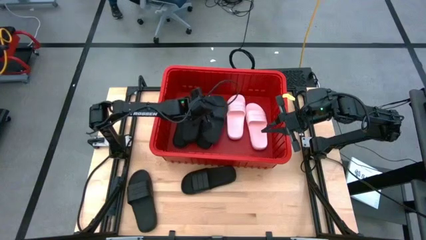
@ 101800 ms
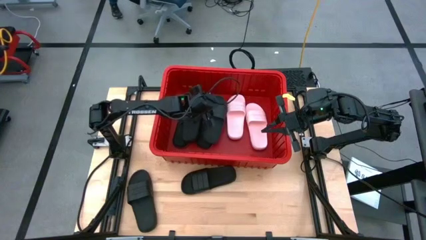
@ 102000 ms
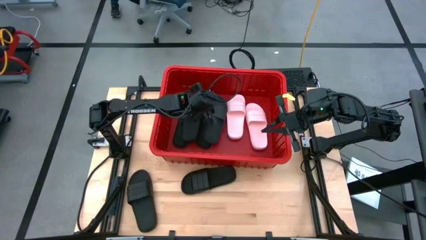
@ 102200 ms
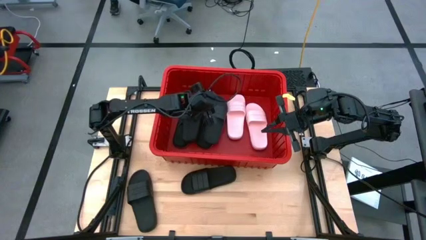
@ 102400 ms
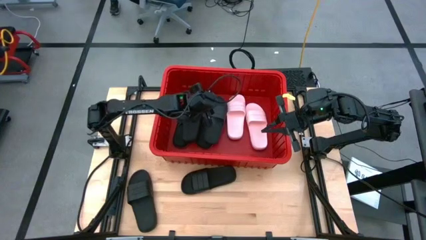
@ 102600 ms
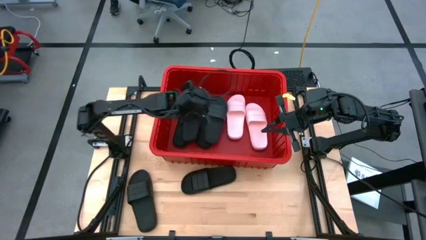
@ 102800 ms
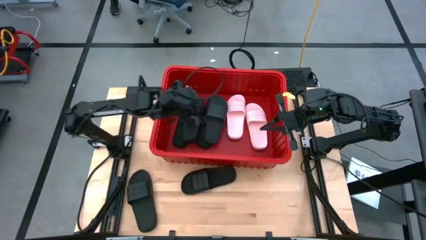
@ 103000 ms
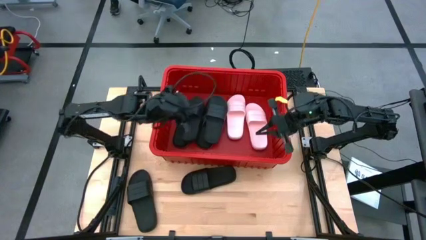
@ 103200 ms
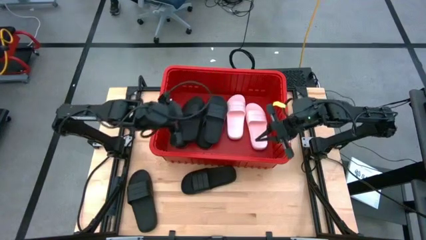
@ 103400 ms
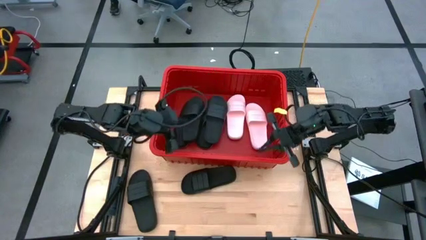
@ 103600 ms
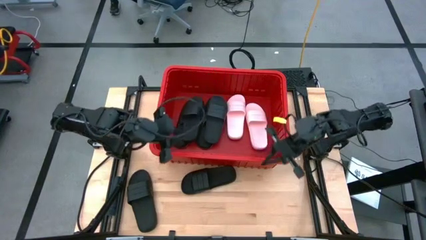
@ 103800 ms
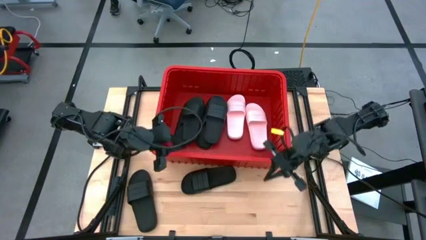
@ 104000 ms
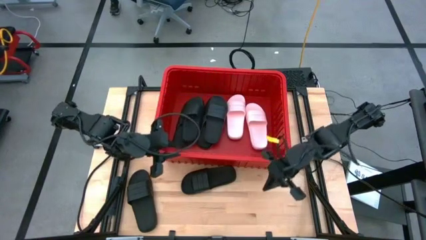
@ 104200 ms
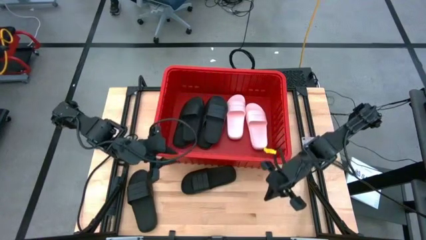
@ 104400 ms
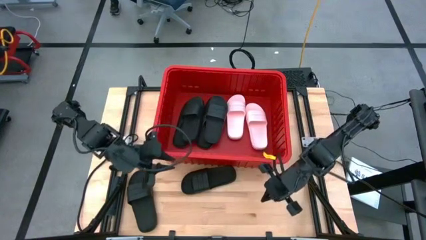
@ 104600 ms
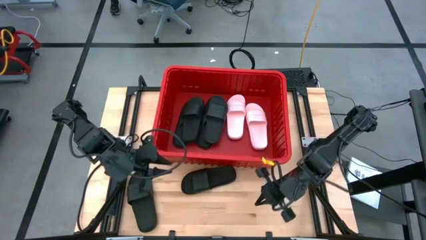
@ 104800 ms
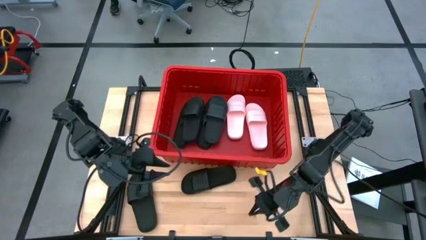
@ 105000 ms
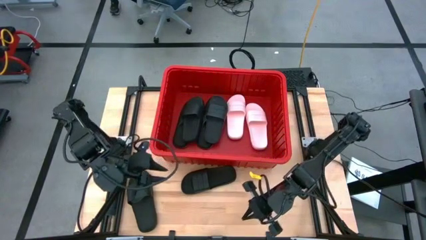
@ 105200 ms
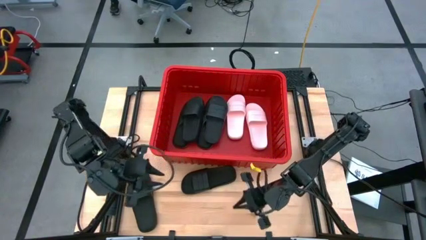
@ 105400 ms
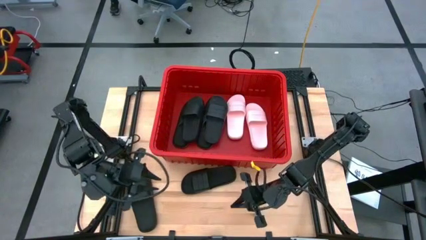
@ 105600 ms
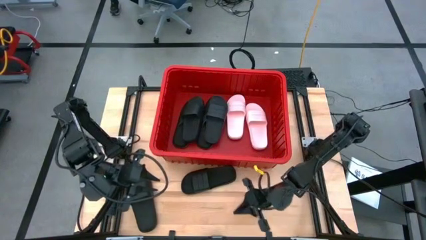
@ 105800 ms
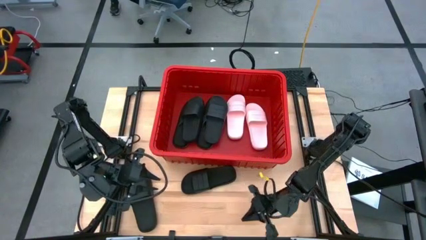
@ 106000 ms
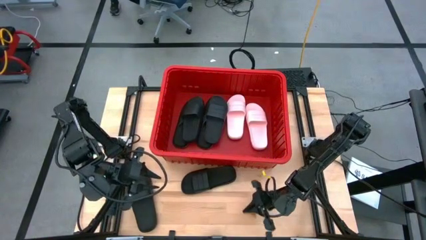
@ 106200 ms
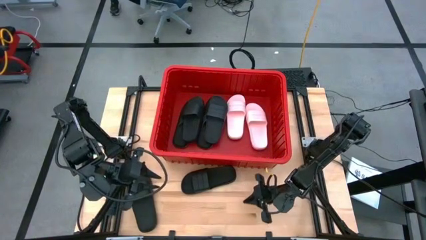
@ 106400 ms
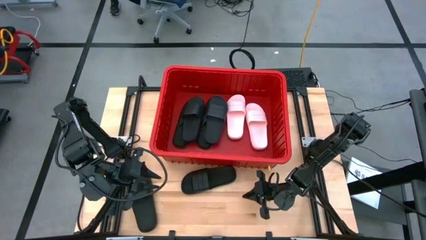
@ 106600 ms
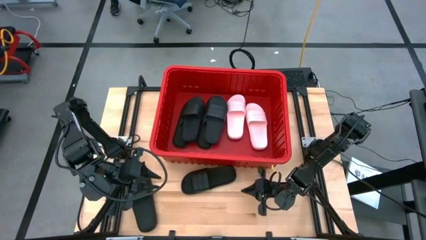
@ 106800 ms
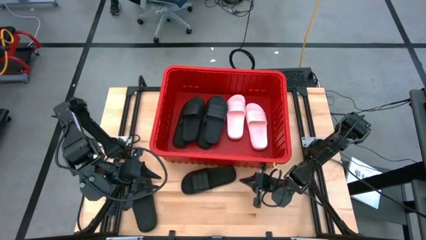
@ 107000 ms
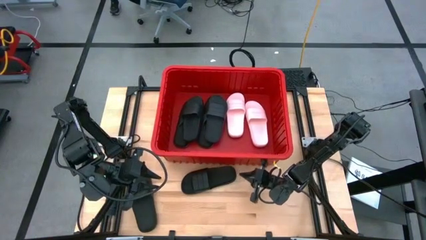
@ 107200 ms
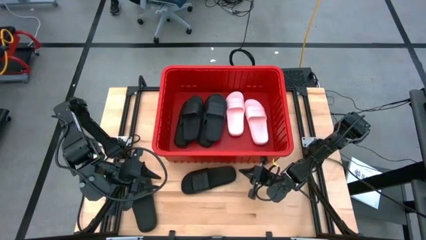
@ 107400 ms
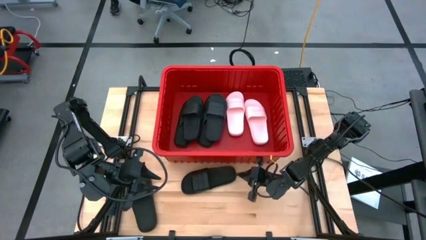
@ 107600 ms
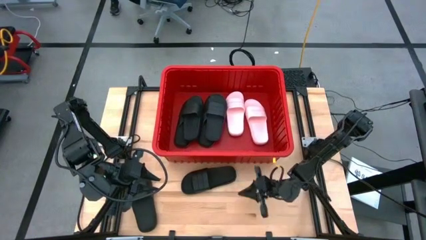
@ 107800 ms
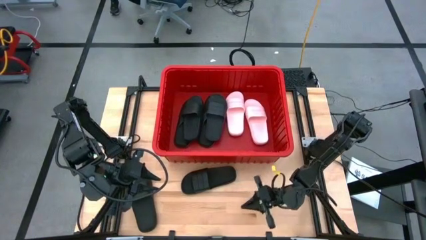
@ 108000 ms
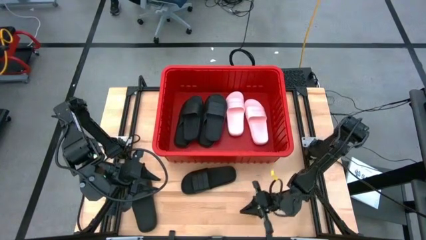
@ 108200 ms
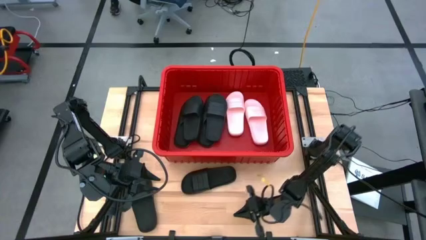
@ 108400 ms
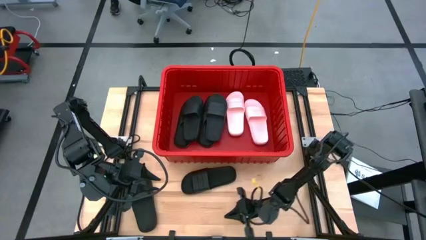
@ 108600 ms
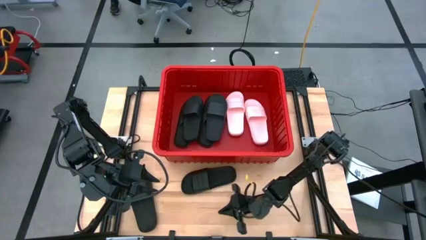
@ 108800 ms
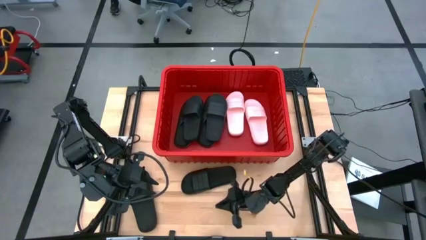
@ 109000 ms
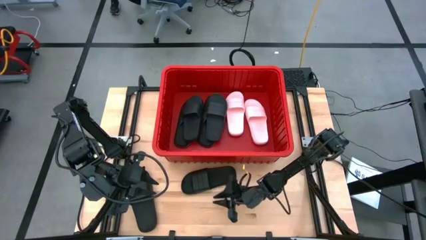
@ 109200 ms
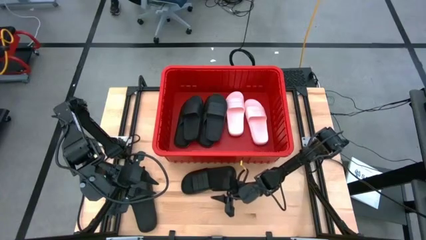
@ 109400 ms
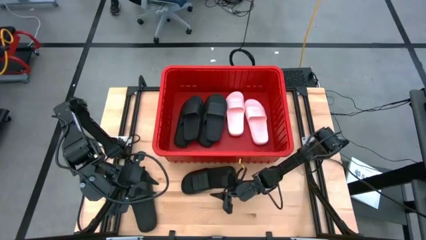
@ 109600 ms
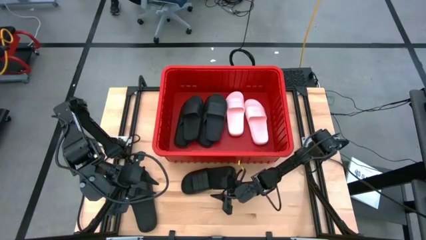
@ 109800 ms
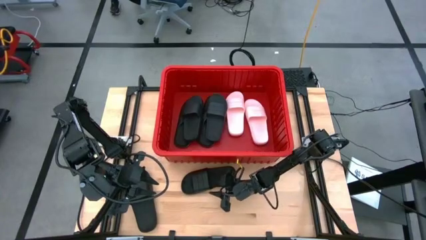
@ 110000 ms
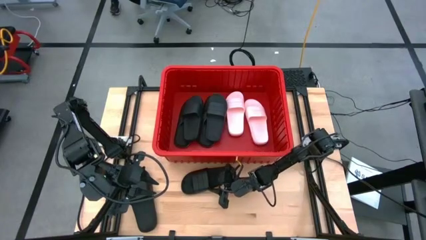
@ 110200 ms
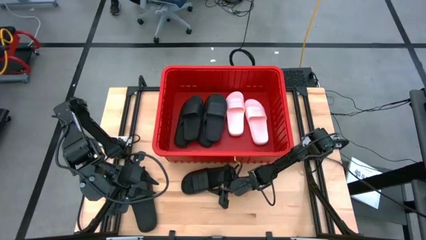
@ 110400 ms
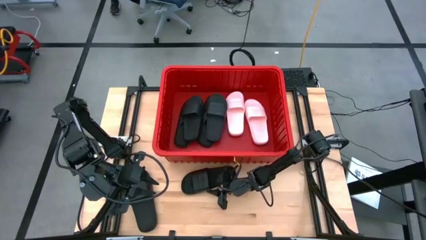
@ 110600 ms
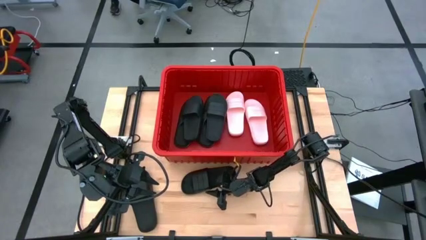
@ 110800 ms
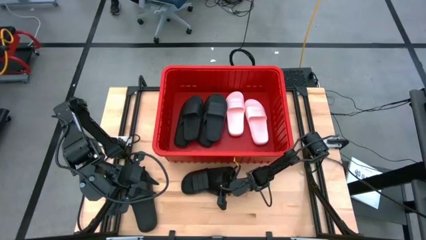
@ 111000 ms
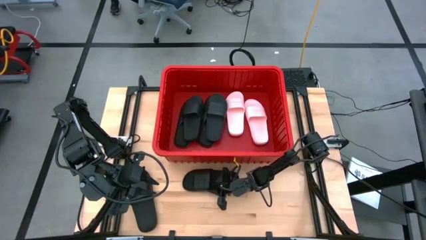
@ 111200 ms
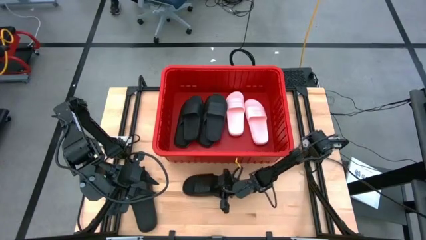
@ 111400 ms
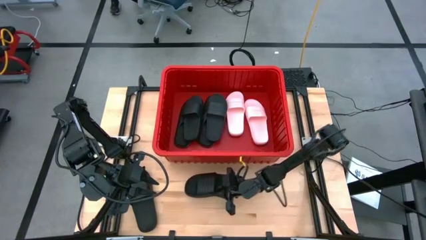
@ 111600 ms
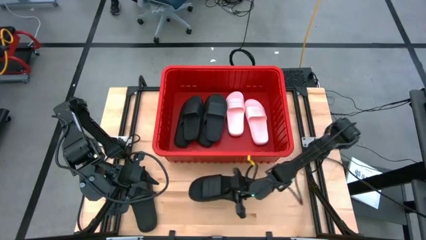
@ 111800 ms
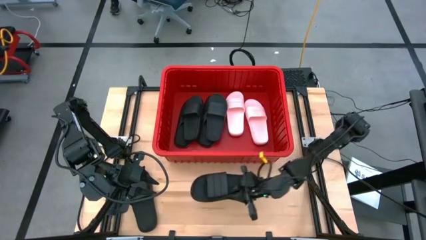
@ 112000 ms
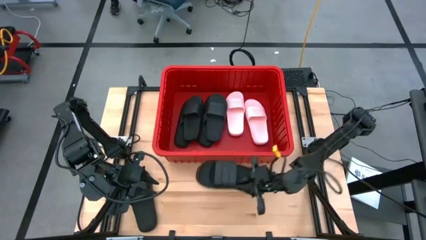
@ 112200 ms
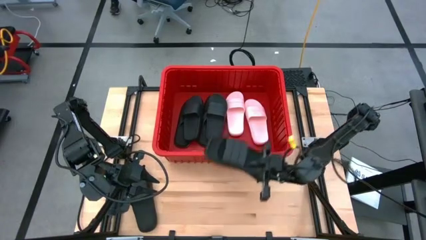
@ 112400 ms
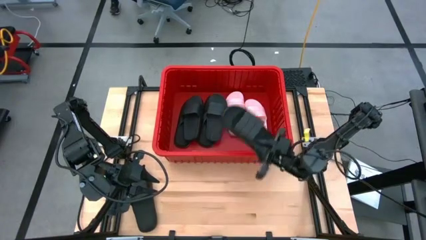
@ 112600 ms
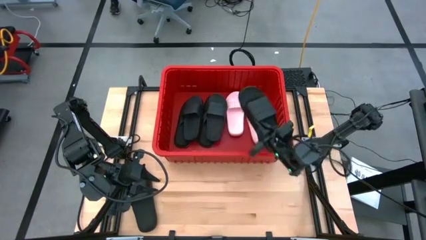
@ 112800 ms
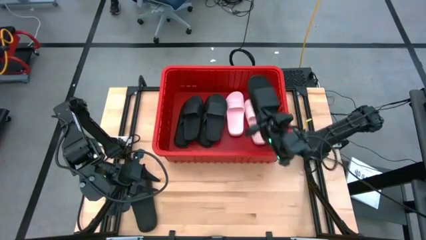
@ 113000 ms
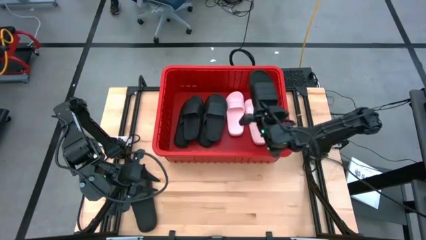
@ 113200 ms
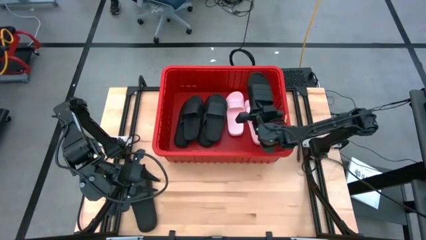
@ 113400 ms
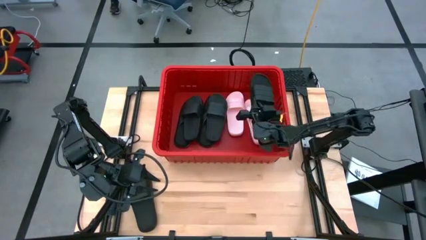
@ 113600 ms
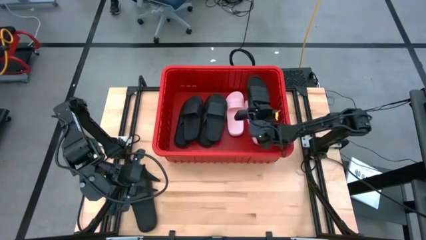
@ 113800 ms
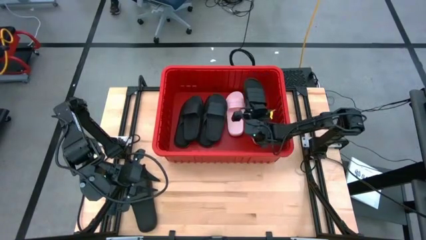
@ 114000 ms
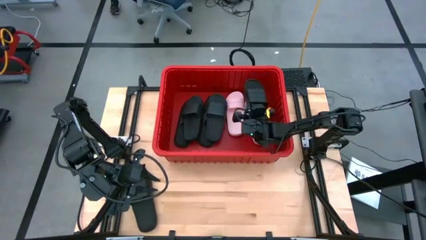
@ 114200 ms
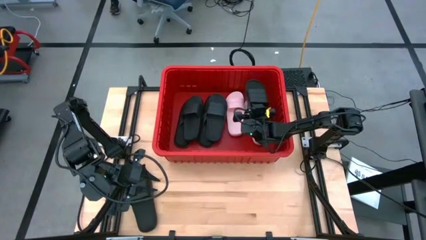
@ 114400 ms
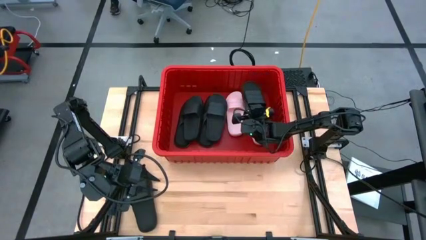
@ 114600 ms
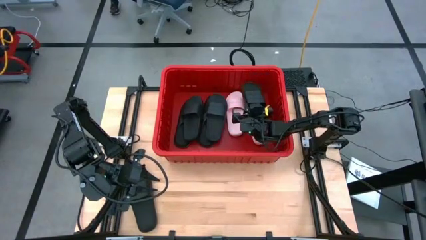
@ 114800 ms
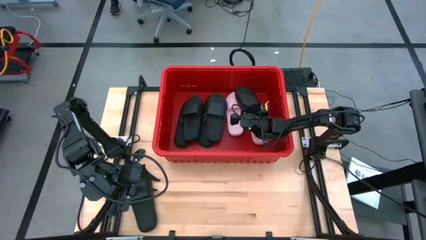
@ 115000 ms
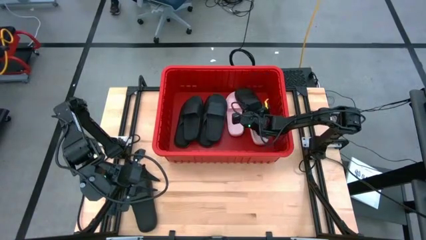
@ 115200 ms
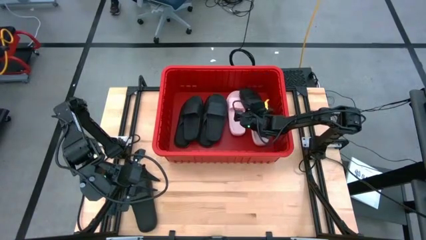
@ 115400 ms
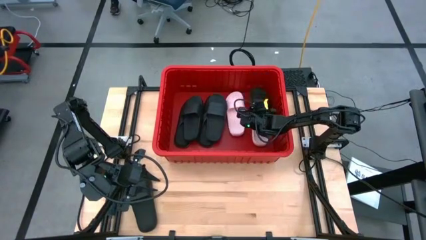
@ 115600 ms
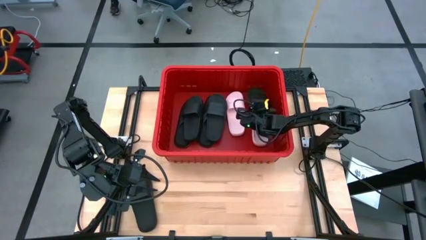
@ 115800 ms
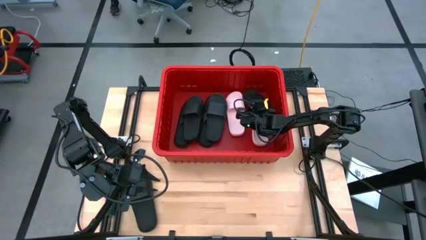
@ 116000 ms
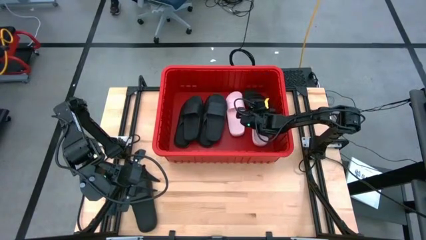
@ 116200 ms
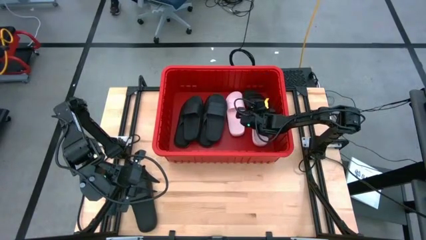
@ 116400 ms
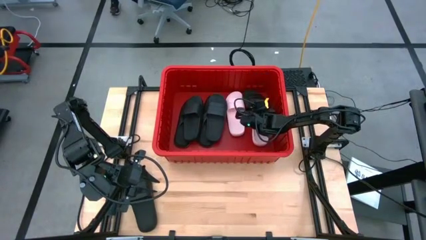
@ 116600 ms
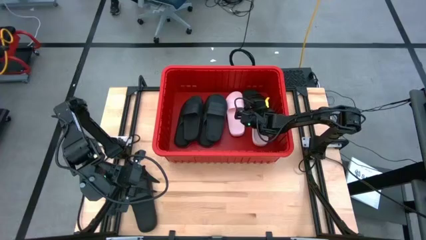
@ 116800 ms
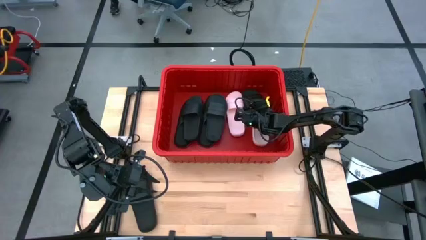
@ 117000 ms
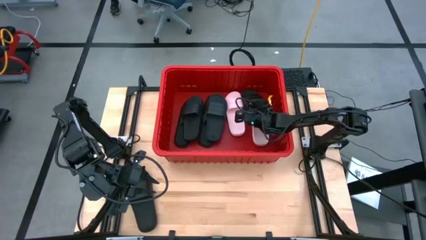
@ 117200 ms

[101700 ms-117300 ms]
Task: Pick and place slides into bin
Put the black slide into the red bin
